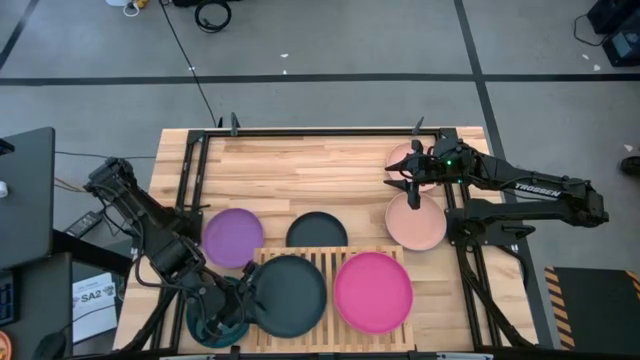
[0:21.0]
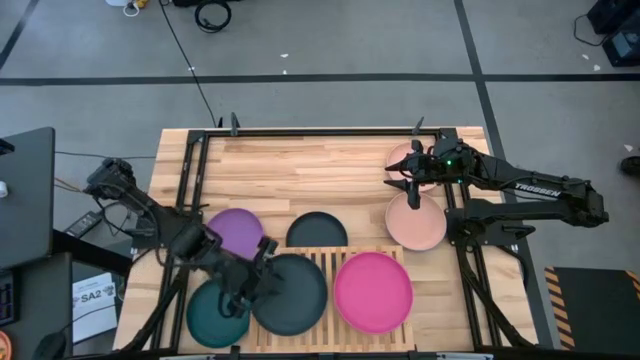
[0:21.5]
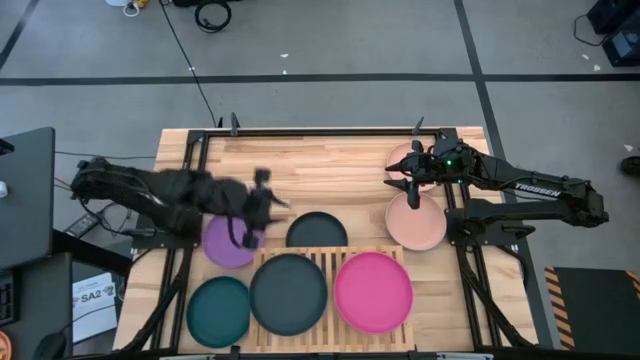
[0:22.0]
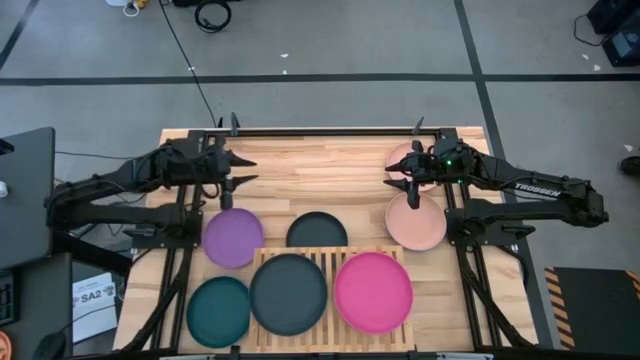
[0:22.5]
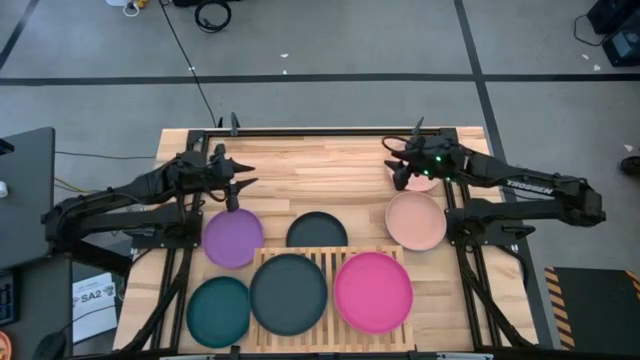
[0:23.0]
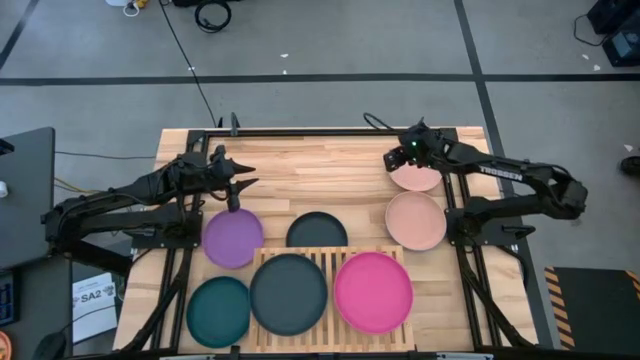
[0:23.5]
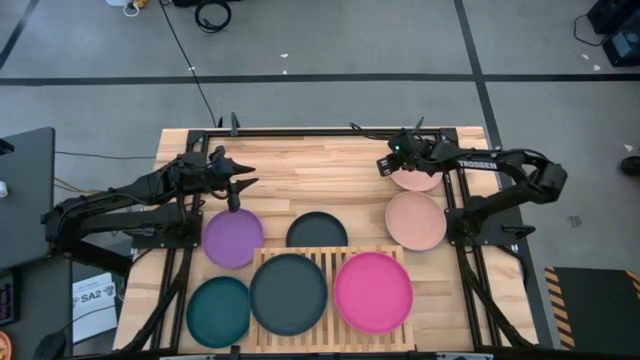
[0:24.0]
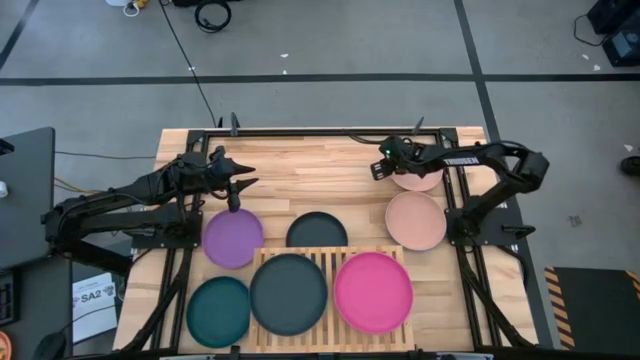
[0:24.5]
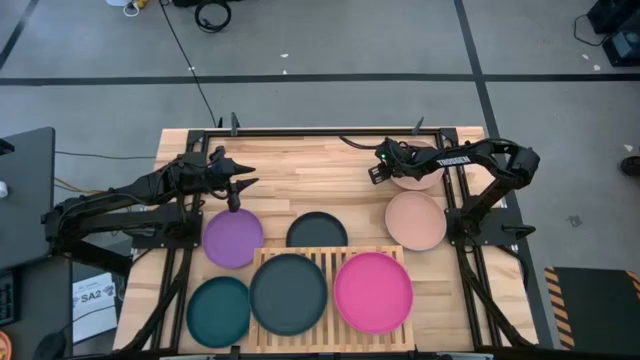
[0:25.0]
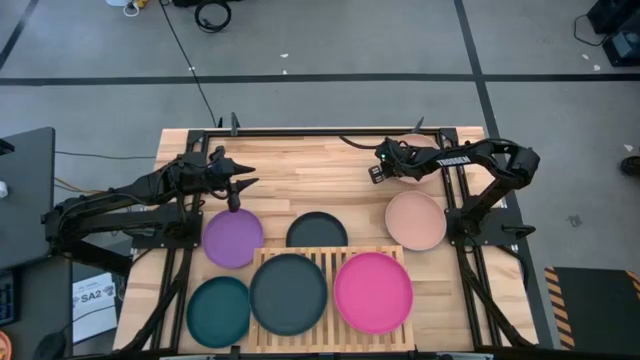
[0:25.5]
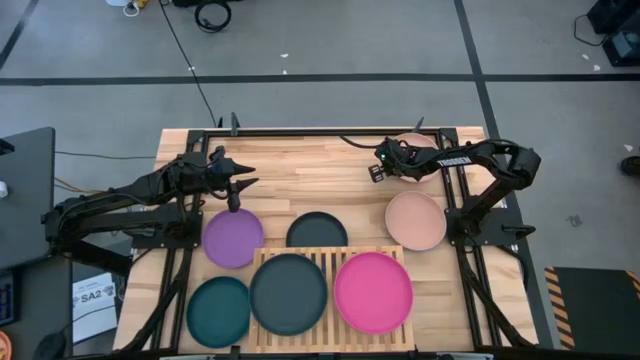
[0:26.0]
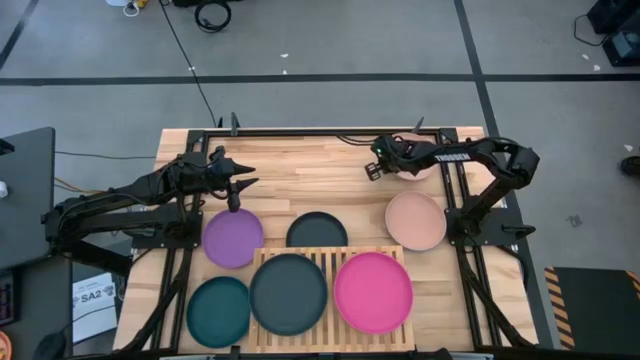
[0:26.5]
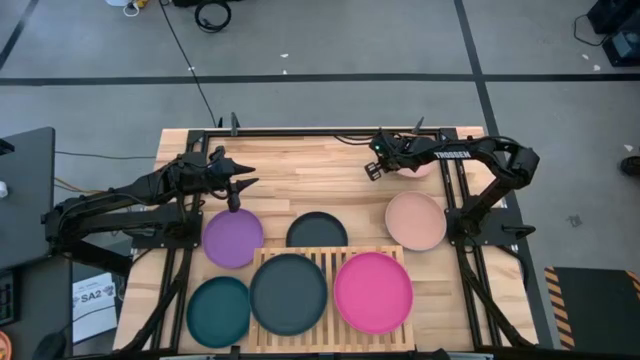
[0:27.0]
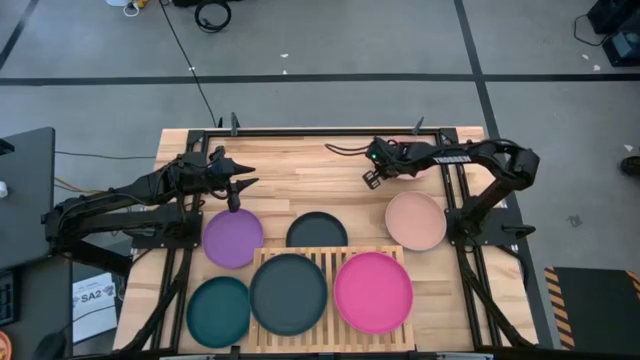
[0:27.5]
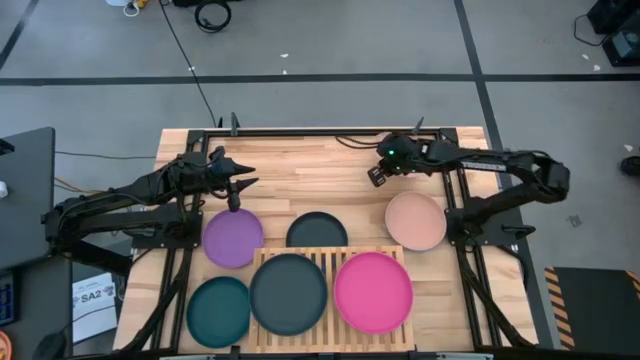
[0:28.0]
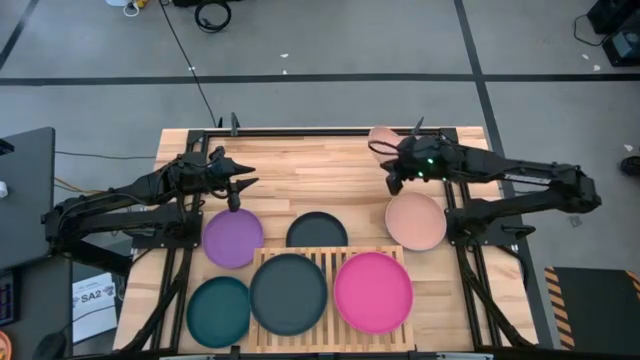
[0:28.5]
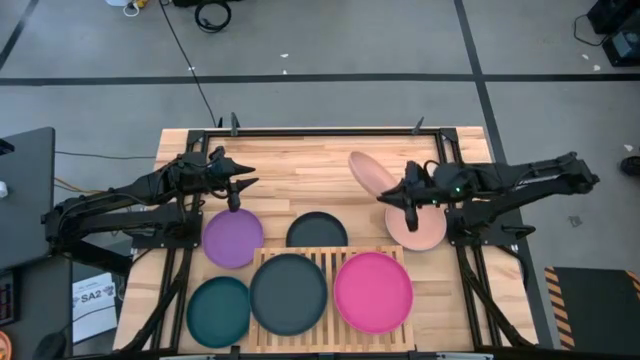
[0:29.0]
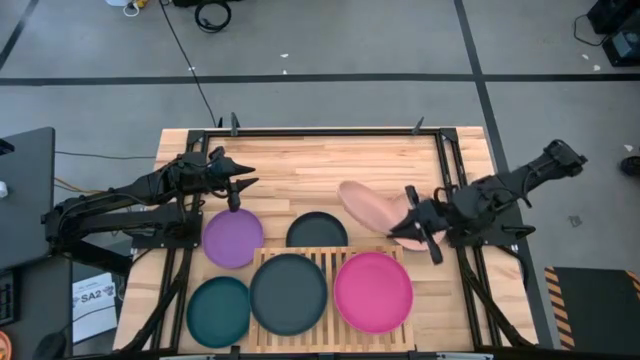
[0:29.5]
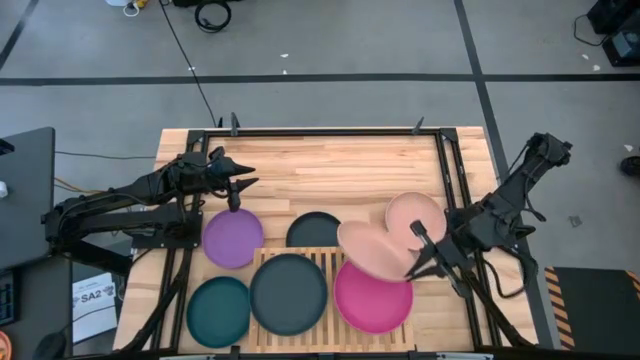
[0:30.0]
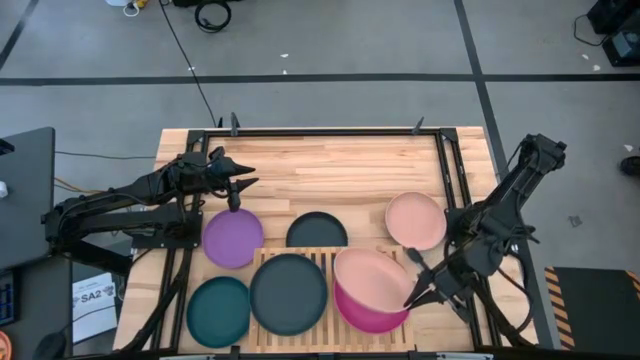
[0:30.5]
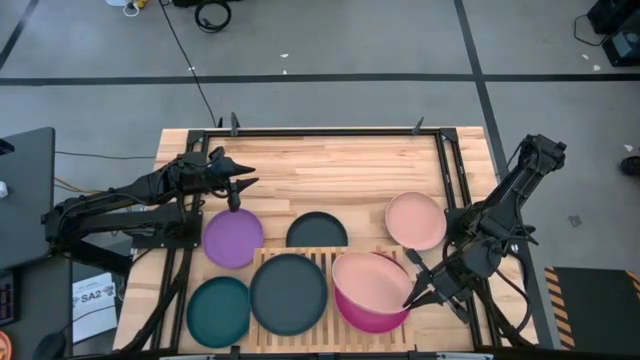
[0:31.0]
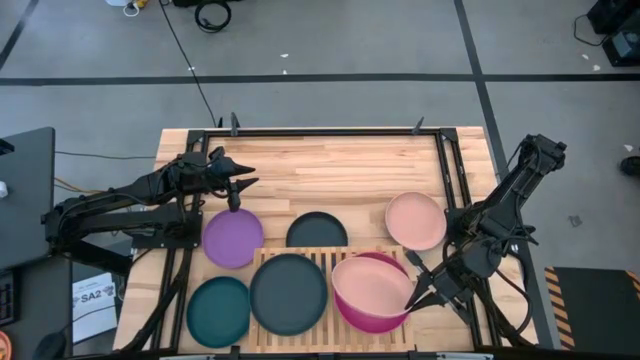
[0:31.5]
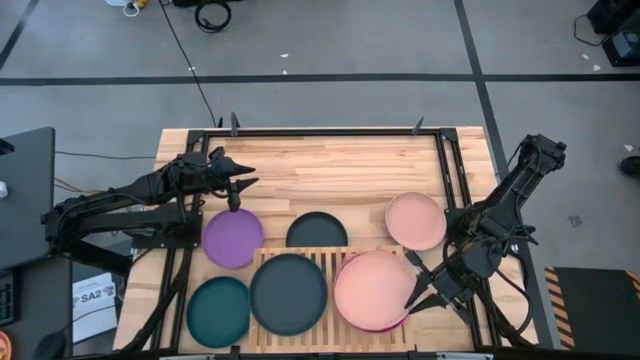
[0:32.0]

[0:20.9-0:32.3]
Task: Place and stack plates onto a shelf
Stack the top light orange plate on top of the pink plate on the shelf

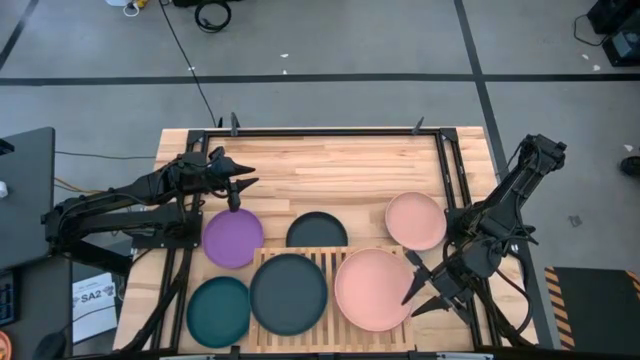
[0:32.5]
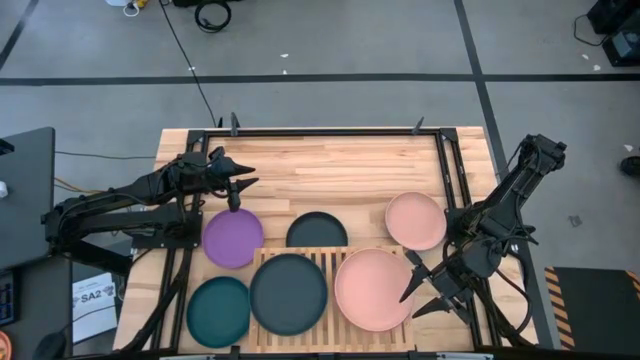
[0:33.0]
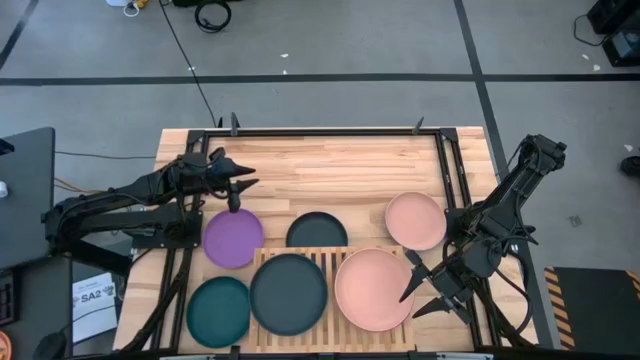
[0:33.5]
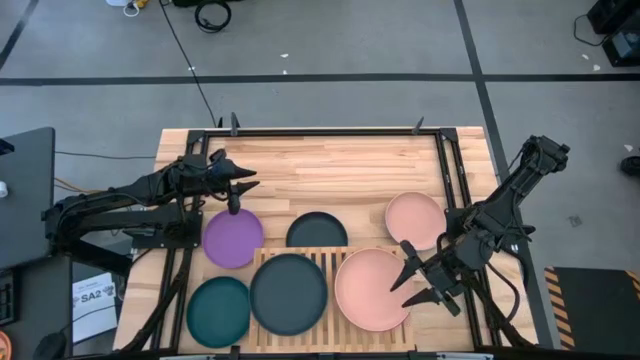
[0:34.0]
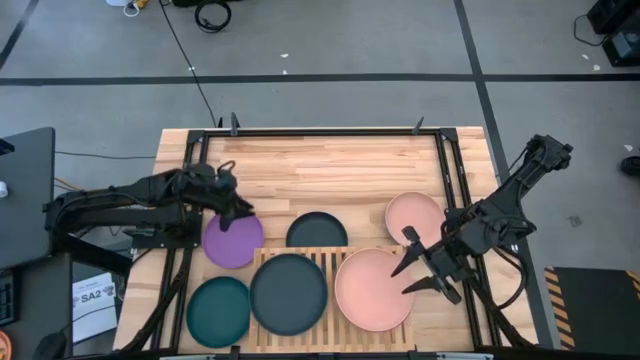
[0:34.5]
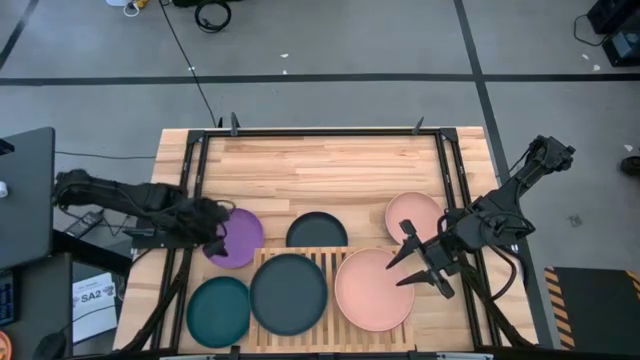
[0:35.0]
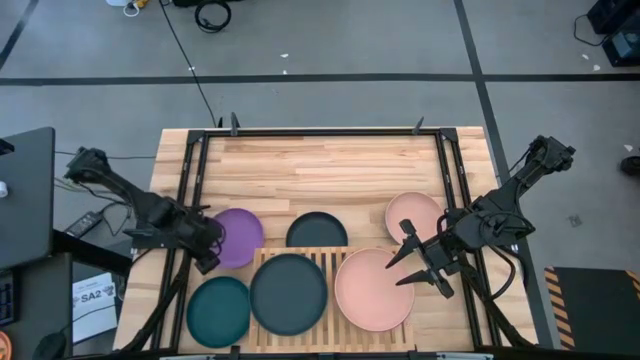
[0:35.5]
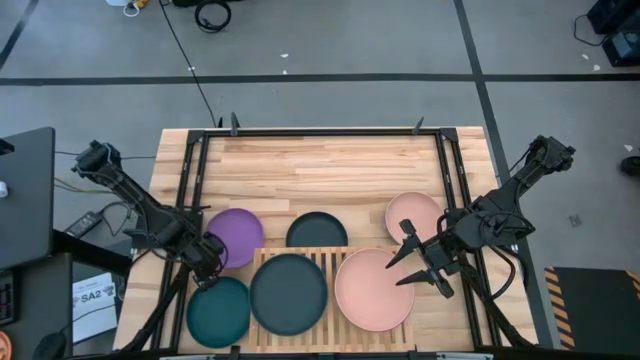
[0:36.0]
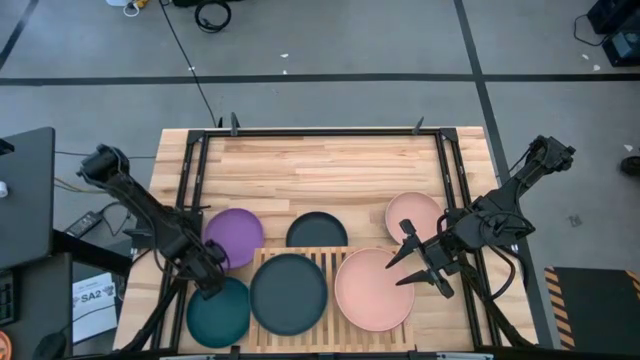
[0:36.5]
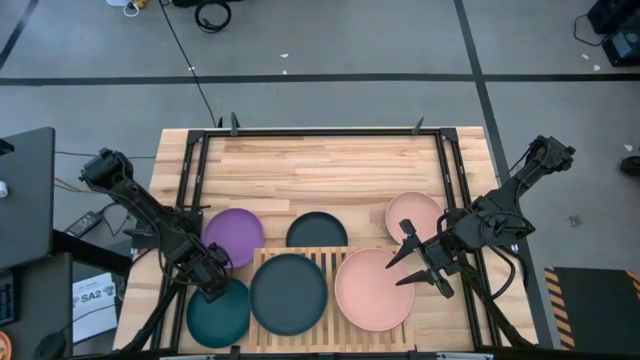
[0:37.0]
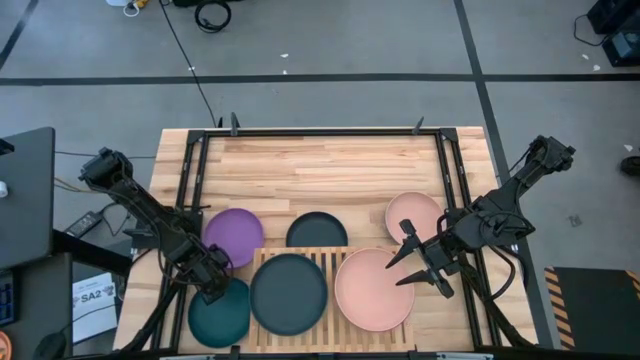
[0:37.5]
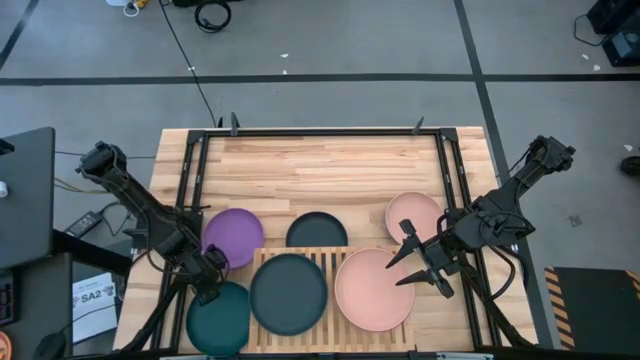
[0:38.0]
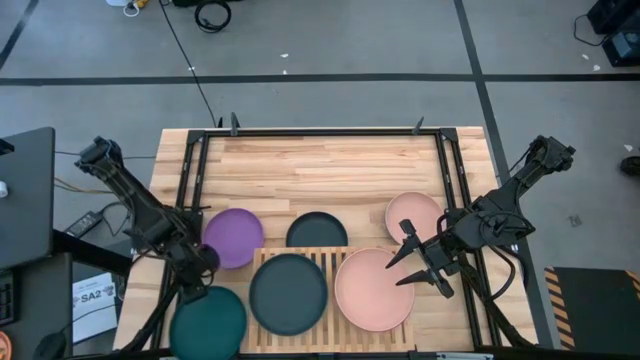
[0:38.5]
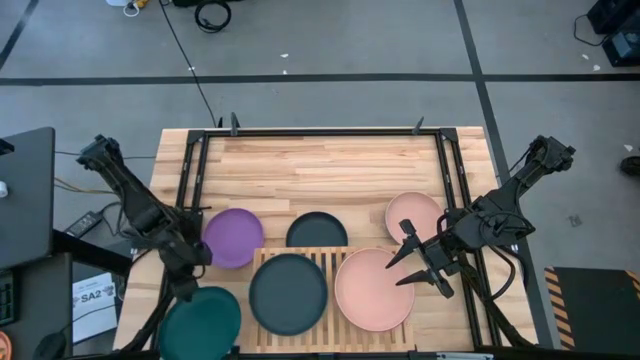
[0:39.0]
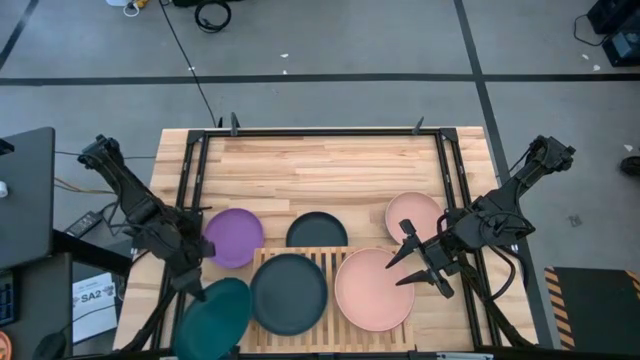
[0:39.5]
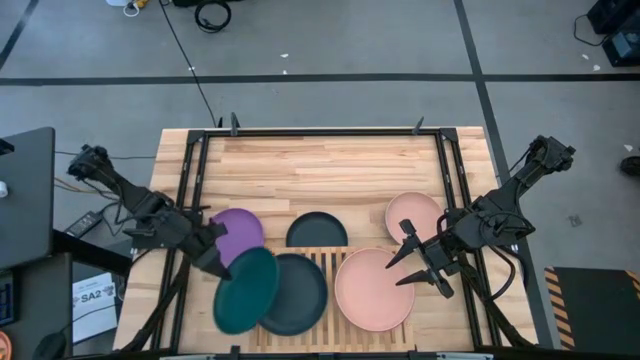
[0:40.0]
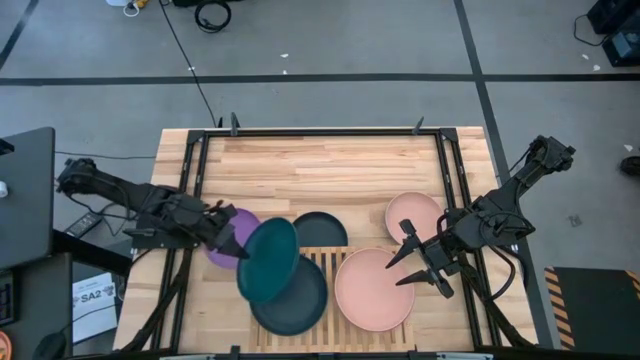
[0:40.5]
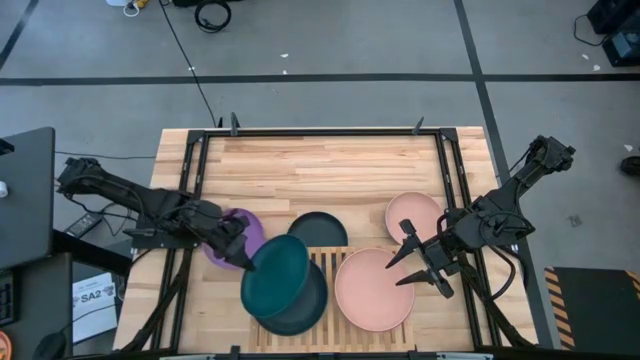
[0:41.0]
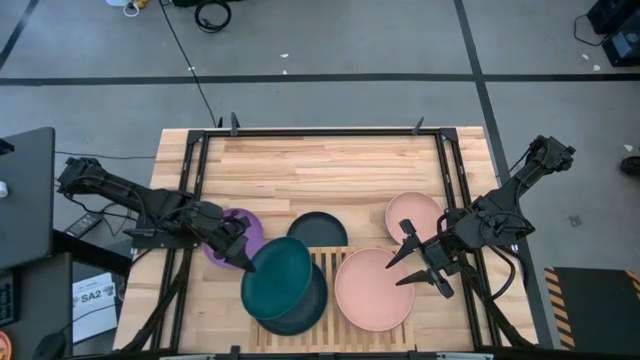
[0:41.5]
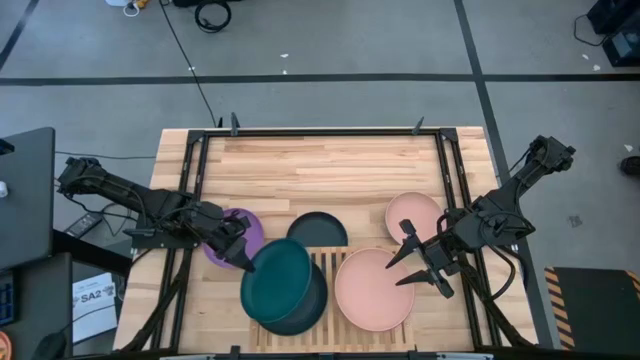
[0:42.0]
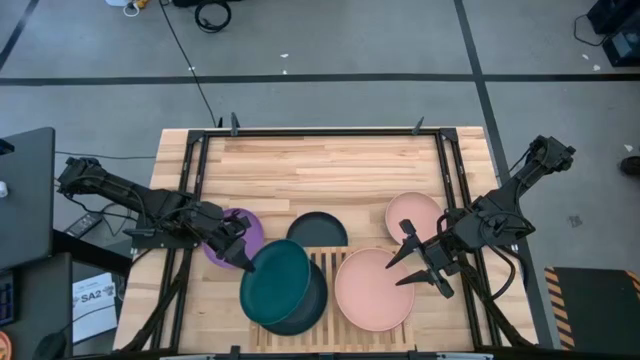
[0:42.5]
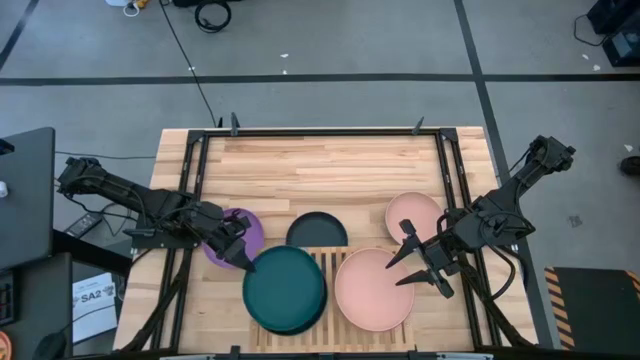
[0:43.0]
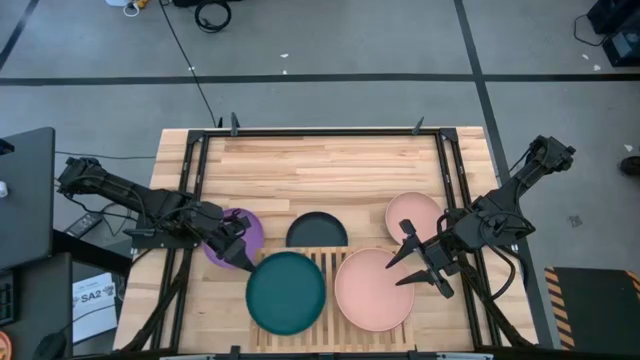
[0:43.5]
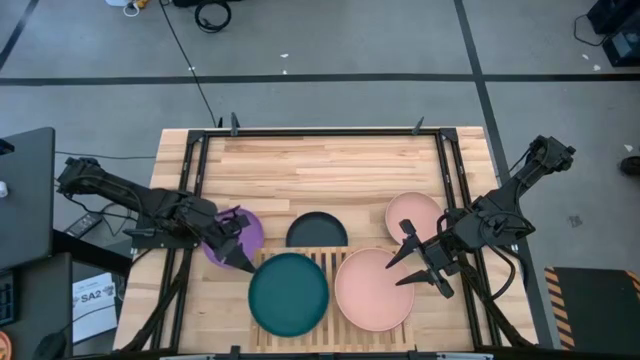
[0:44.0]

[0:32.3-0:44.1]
Stack the dark green plate on top of the black plate on the shelf

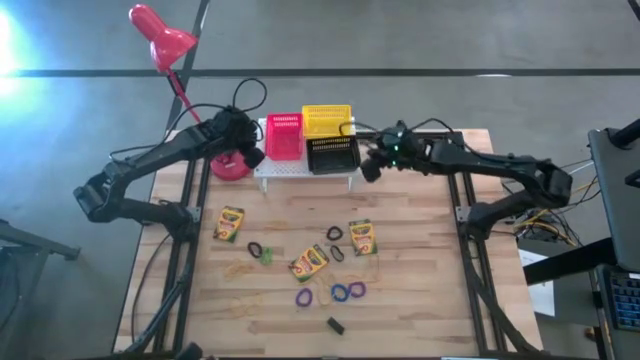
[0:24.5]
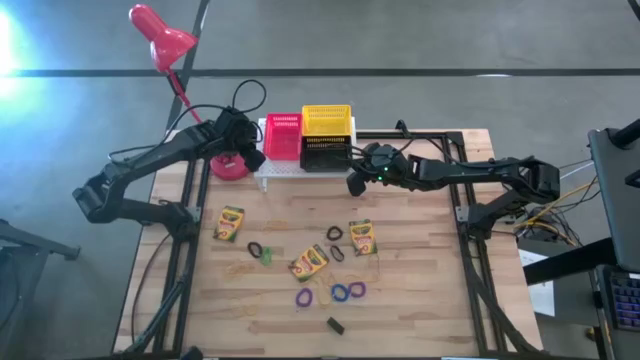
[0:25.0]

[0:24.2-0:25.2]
Task: Pick & Place Office Desk Supplies
Adjust the black bin on the shelf
